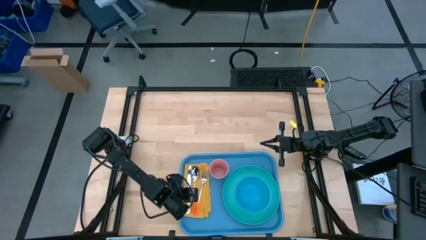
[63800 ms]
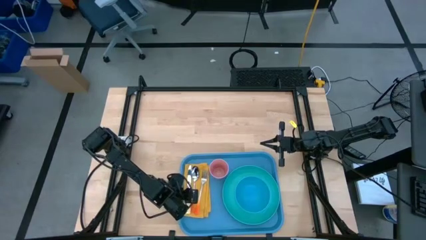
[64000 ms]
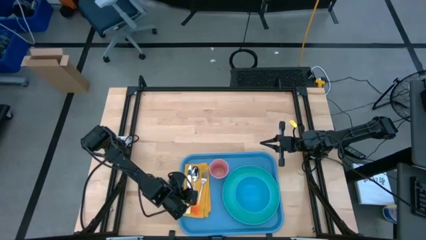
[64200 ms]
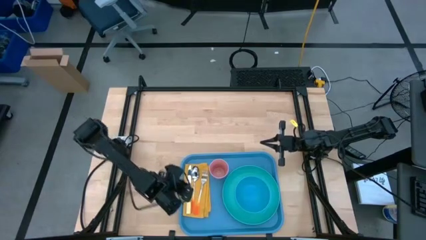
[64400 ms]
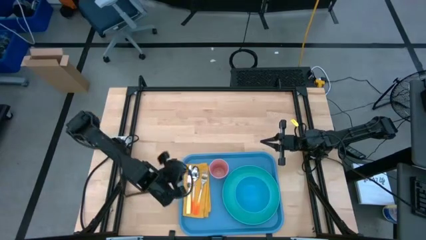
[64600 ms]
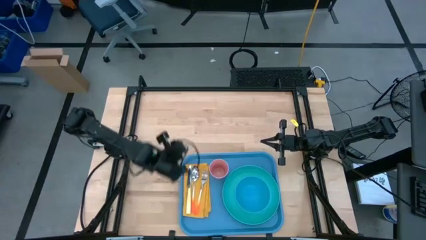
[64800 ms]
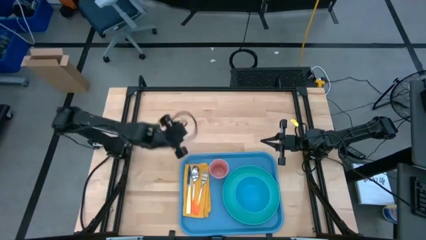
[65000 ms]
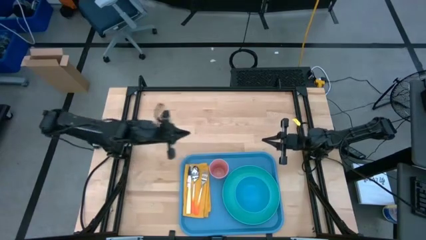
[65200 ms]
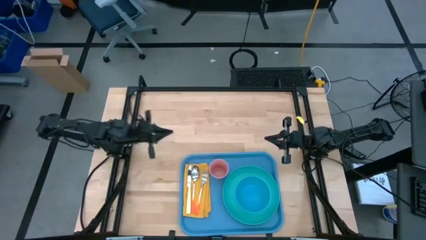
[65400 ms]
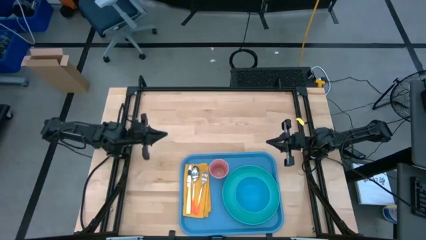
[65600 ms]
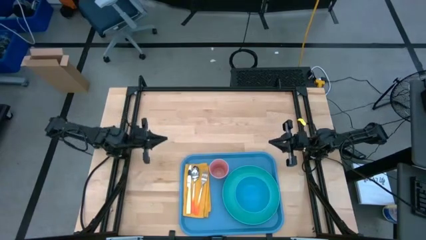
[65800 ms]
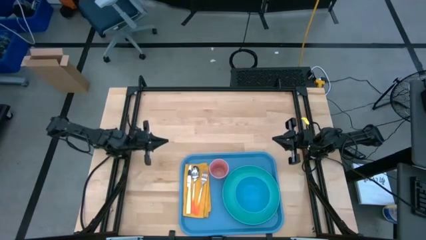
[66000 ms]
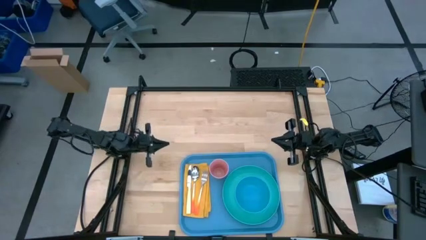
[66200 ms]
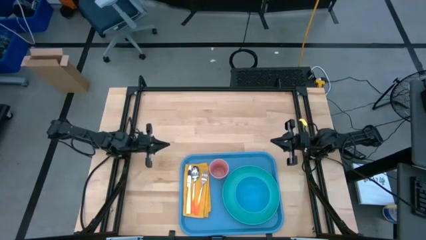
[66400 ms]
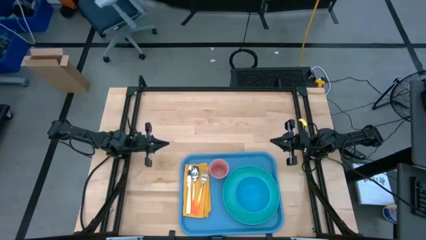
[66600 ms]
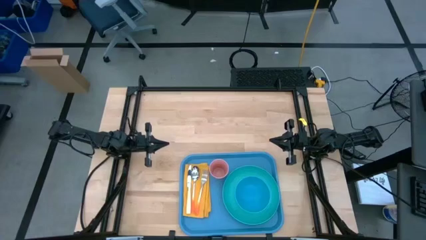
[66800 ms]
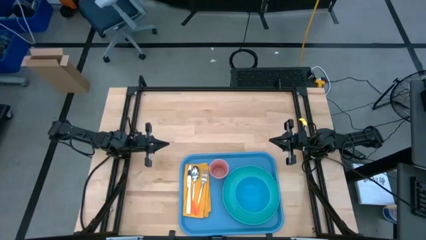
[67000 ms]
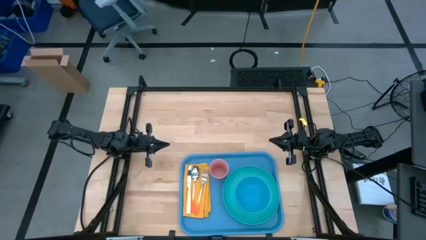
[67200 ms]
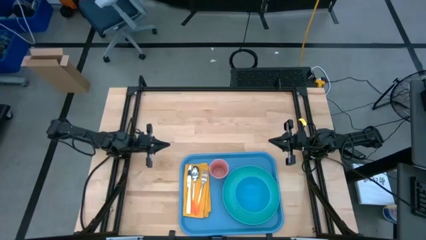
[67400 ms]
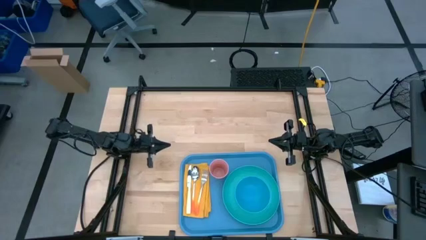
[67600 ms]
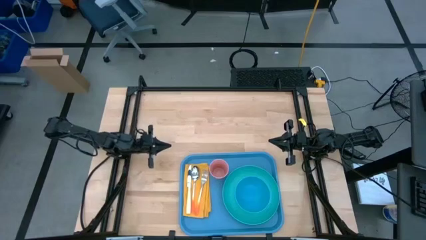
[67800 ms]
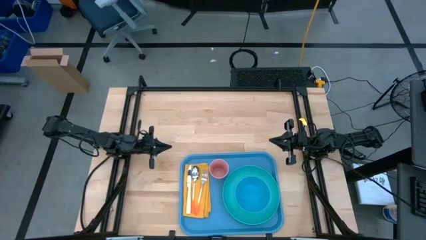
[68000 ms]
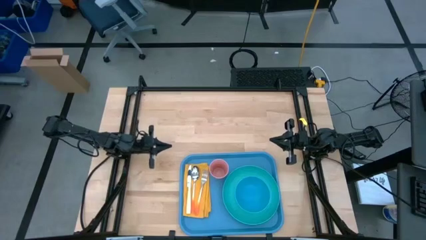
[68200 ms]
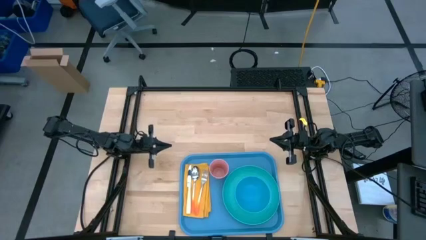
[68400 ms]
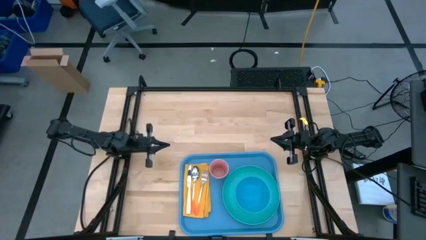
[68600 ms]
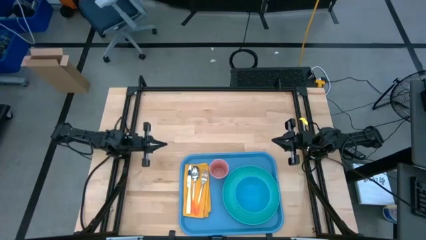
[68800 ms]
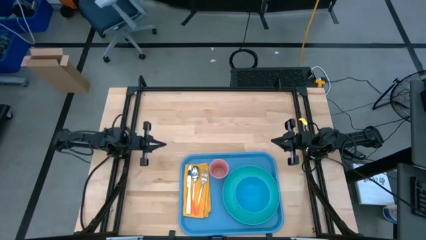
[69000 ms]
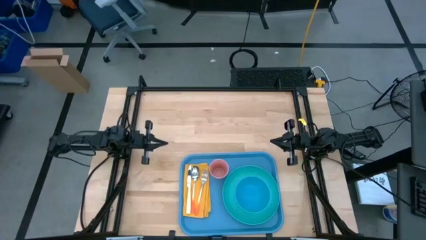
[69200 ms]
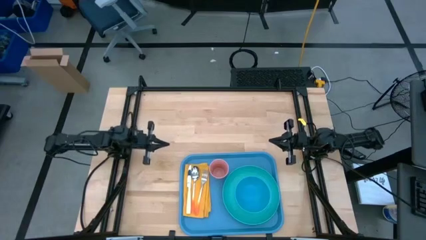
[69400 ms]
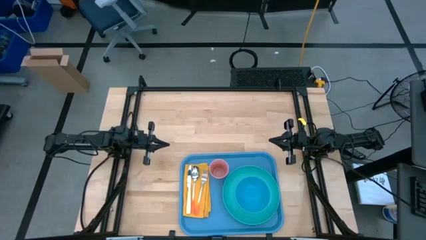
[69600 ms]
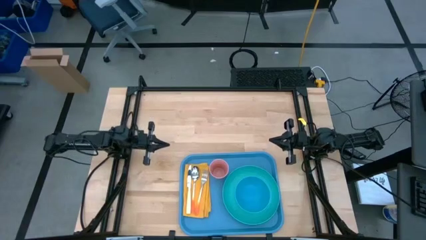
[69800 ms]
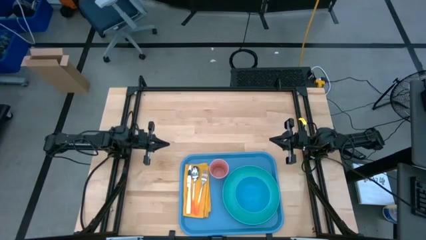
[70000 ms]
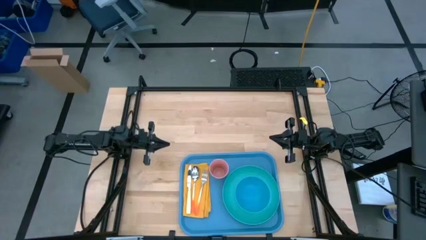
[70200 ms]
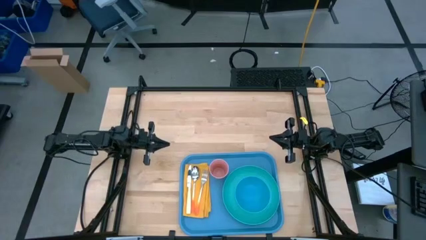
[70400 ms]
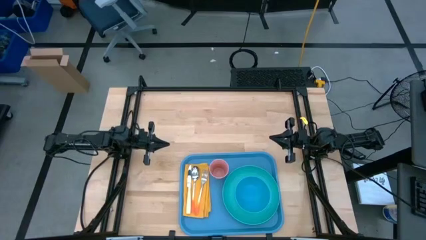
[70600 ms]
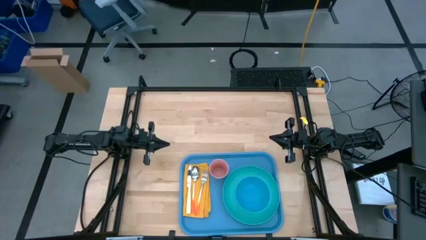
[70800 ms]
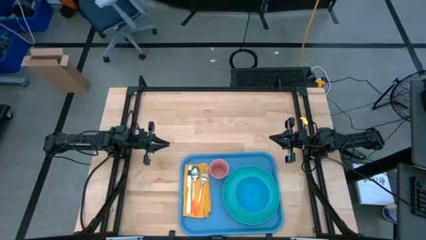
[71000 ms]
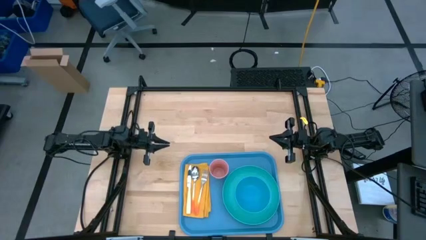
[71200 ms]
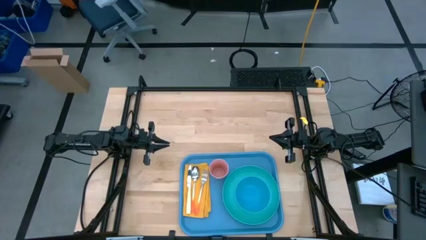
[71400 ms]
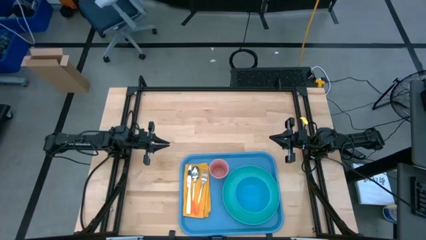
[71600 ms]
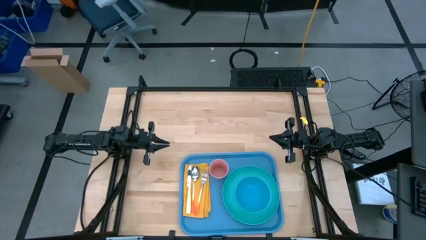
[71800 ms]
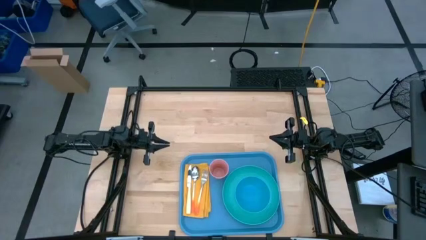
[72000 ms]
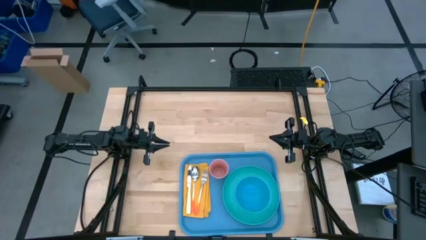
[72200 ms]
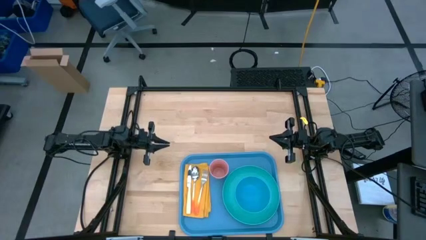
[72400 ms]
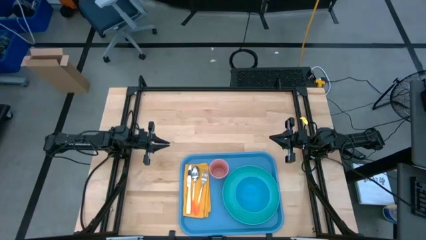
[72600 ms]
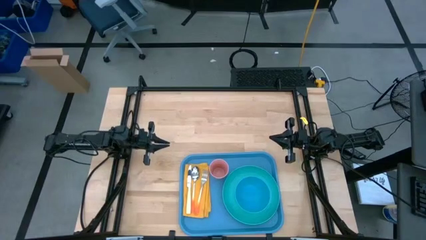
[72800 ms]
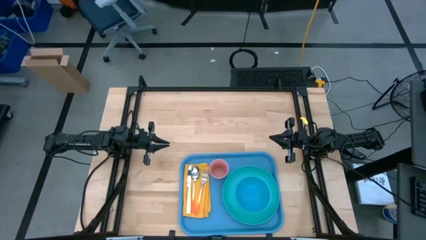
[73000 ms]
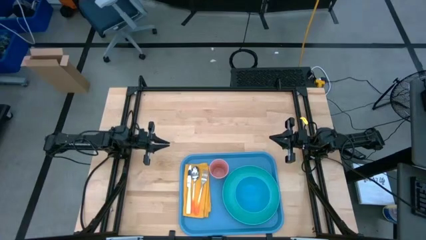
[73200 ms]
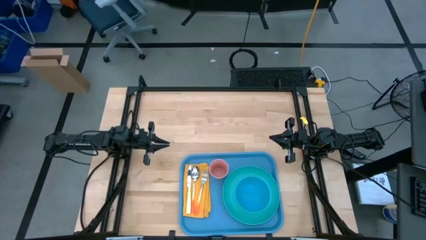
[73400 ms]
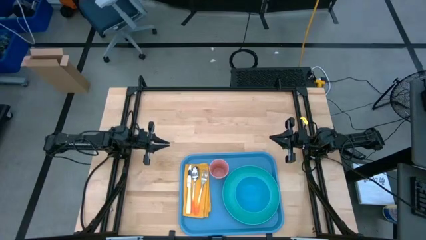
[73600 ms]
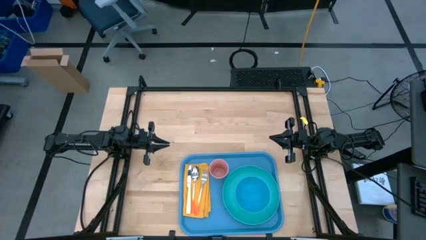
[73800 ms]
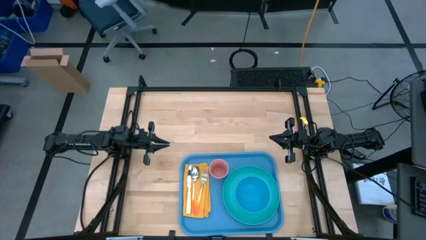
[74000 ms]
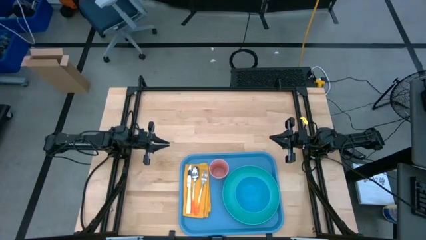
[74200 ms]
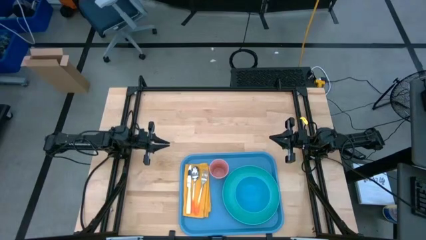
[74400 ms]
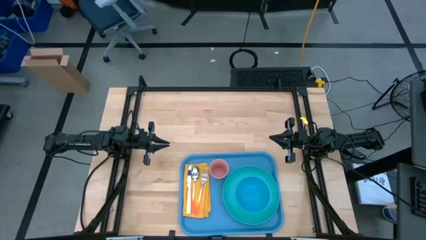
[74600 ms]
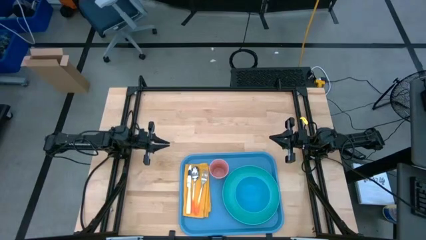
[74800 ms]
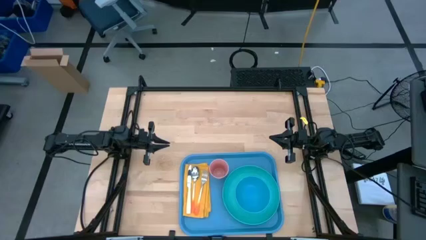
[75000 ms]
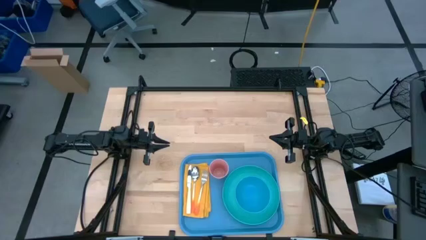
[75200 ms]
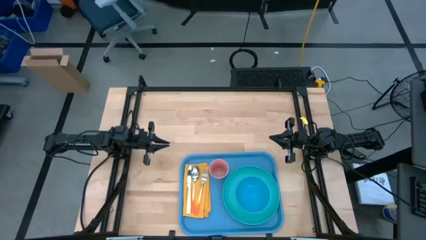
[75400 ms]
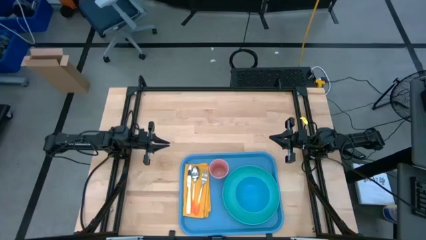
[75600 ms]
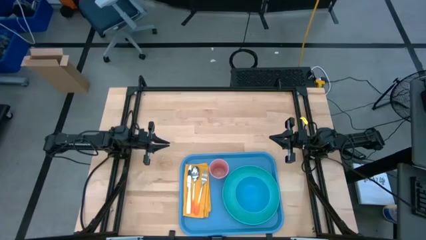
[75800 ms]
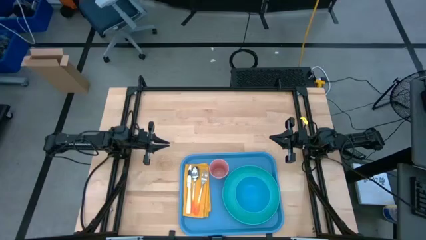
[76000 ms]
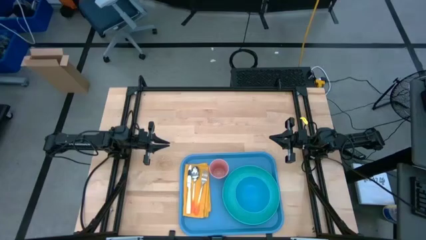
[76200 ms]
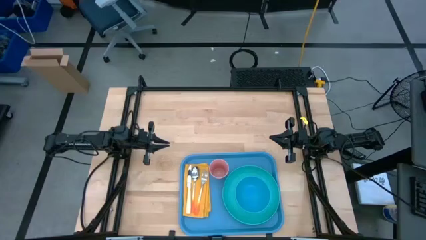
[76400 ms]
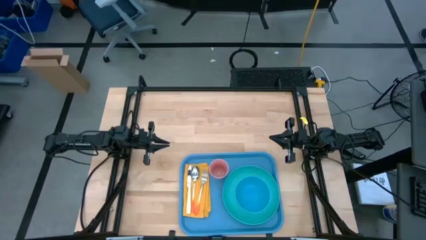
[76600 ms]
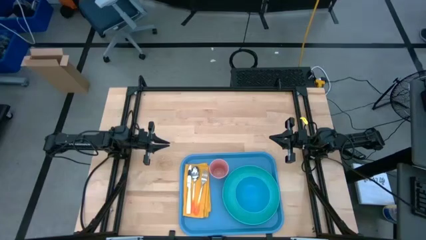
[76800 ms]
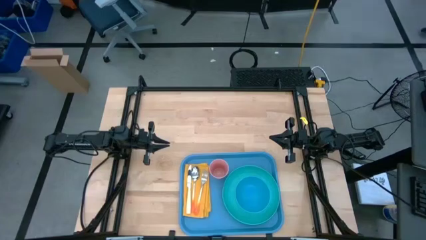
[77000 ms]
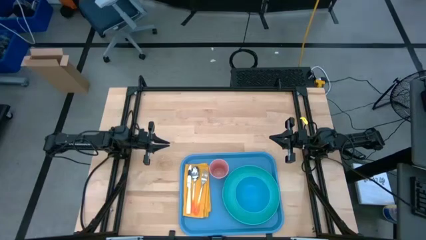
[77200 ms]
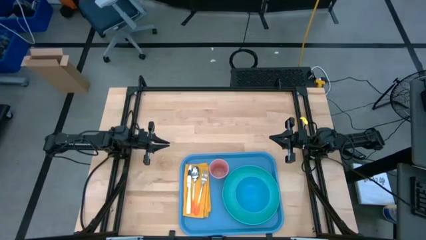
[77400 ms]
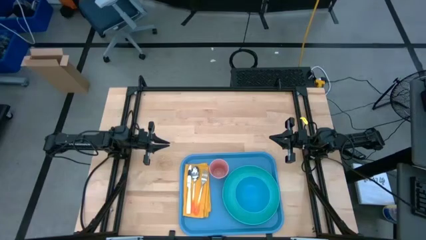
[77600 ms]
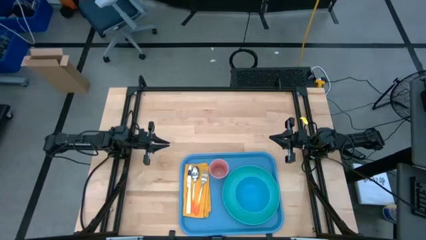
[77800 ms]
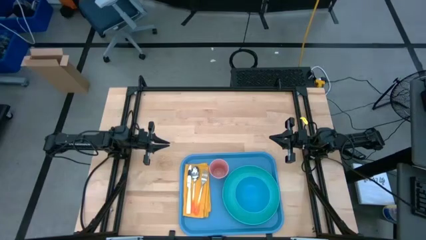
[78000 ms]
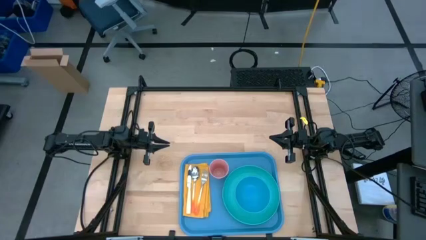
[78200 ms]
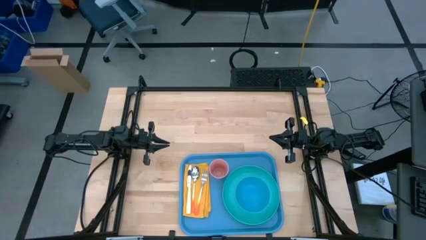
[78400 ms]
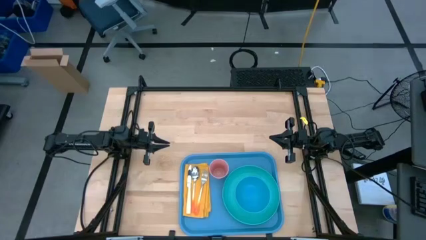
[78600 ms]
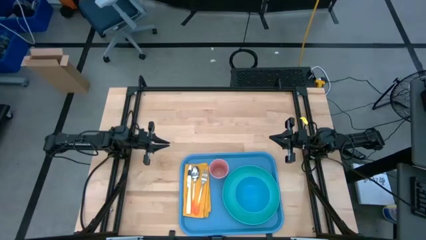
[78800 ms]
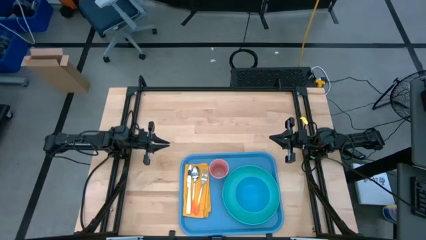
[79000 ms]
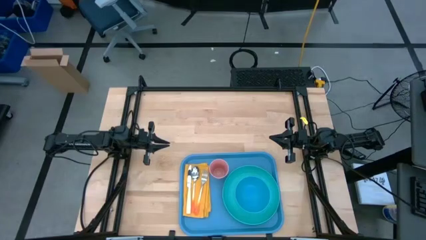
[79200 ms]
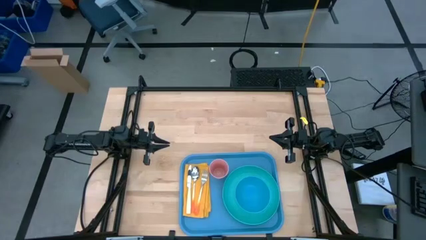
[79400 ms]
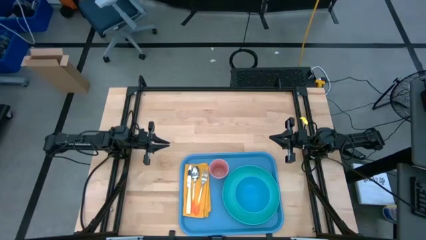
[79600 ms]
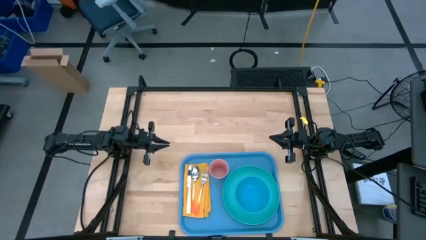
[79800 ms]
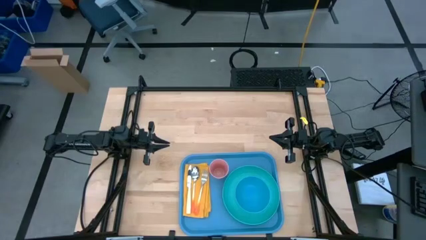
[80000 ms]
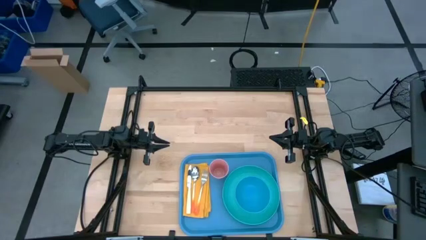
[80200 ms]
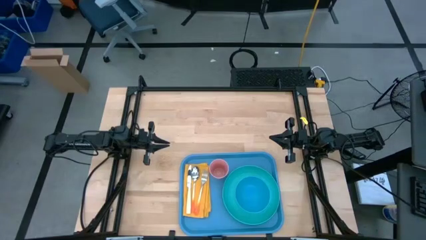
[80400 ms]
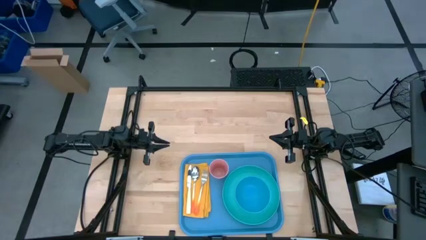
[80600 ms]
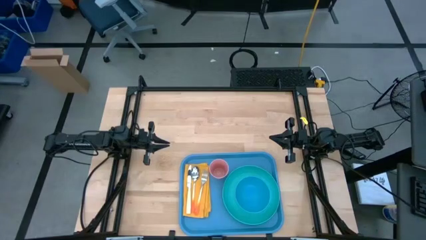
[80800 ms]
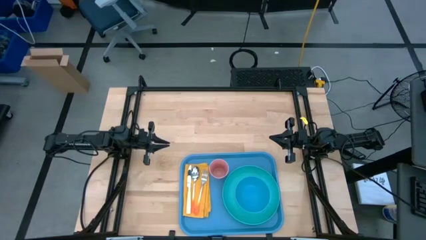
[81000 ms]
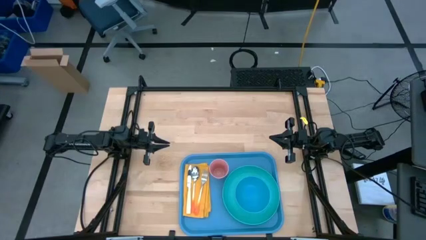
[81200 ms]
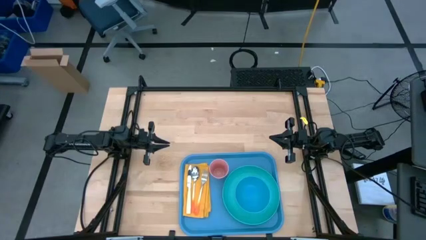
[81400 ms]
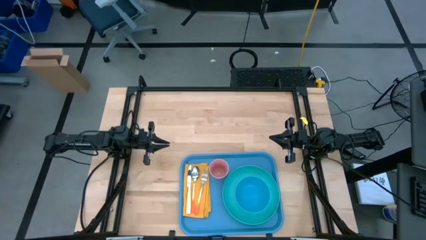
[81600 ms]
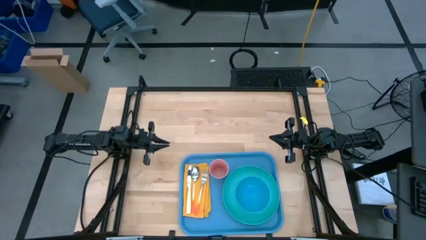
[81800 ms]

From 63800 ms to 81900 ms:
Task: Set up tray
Return to Home Position
